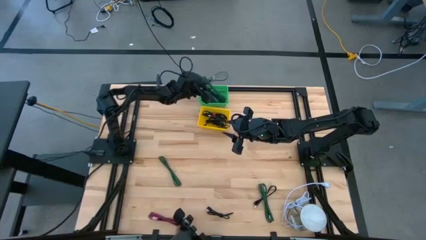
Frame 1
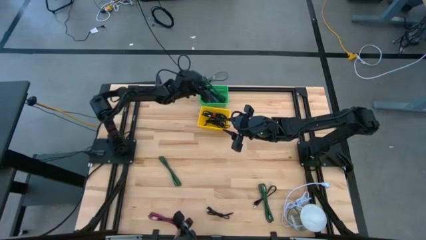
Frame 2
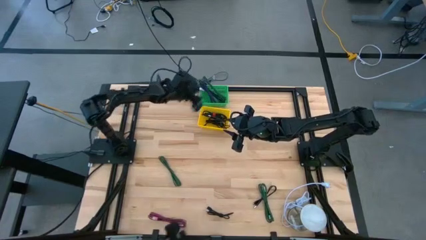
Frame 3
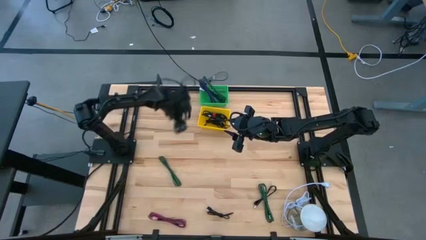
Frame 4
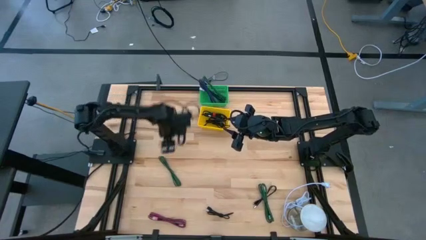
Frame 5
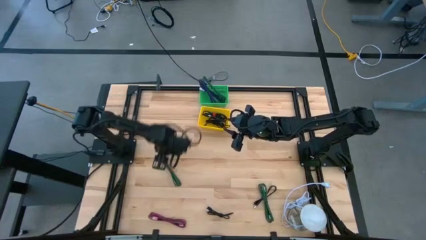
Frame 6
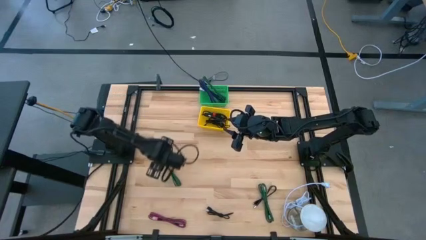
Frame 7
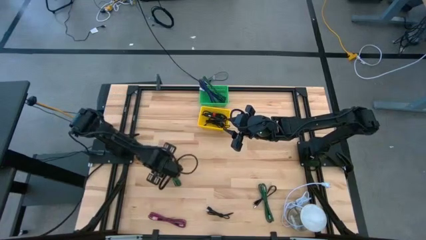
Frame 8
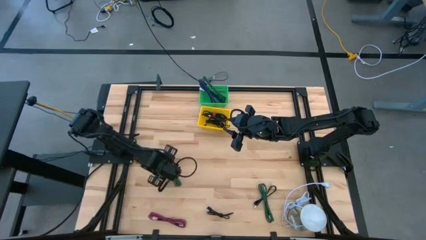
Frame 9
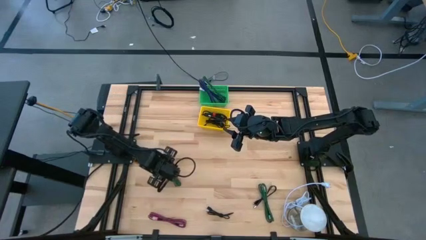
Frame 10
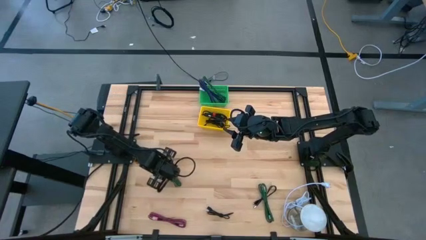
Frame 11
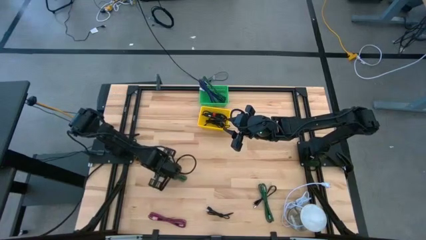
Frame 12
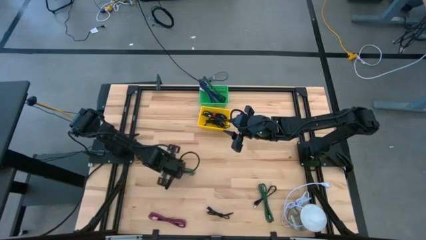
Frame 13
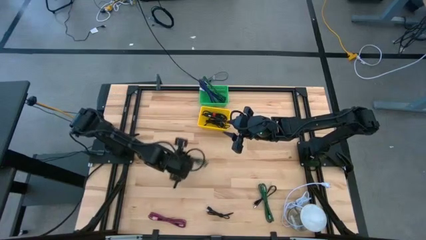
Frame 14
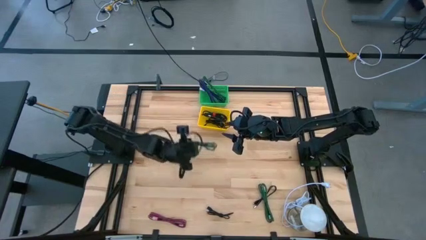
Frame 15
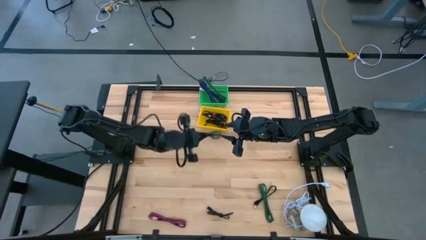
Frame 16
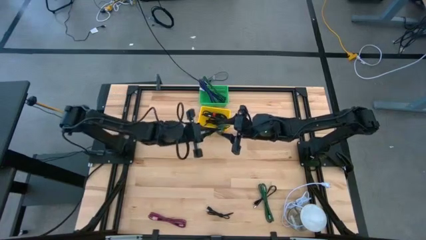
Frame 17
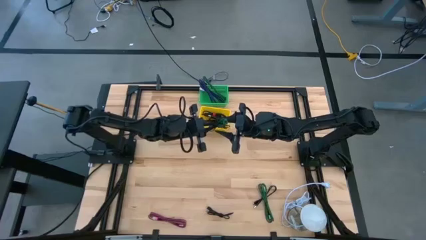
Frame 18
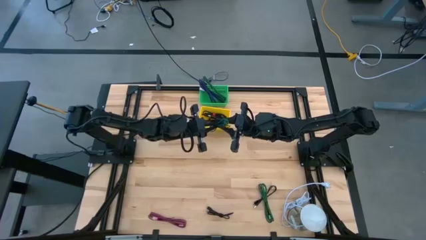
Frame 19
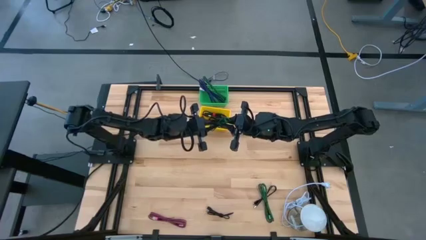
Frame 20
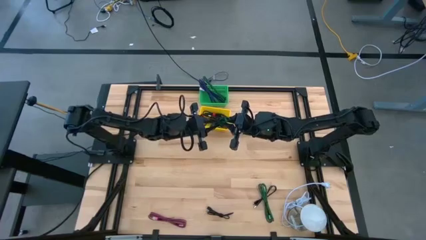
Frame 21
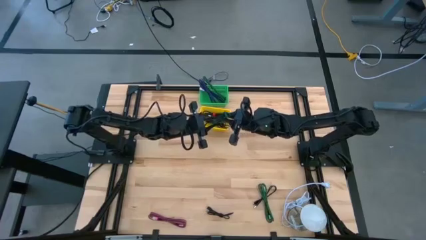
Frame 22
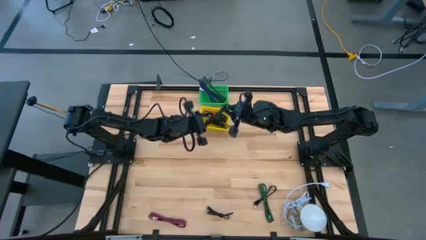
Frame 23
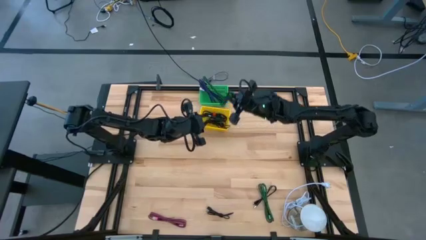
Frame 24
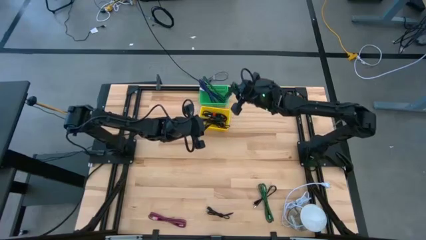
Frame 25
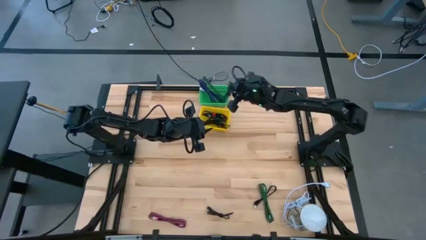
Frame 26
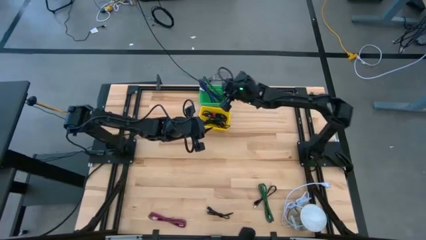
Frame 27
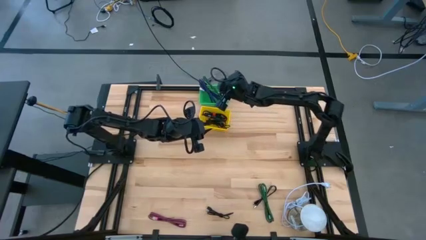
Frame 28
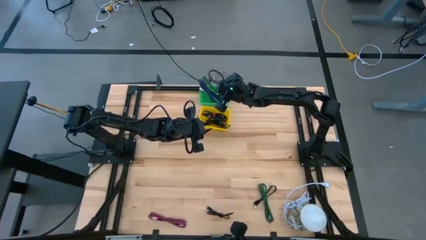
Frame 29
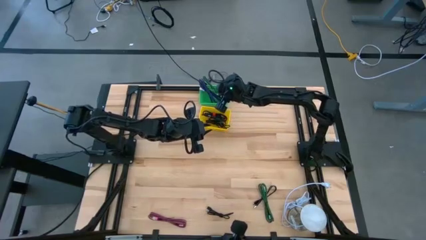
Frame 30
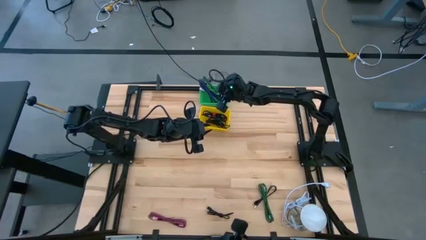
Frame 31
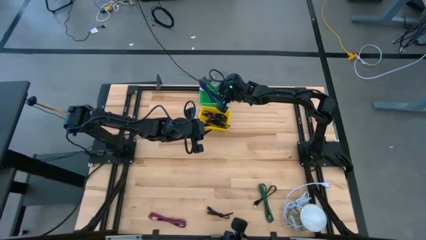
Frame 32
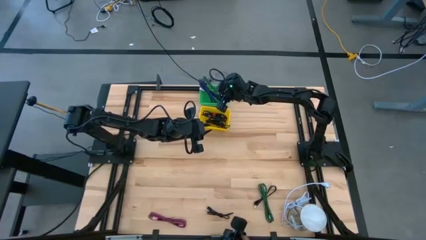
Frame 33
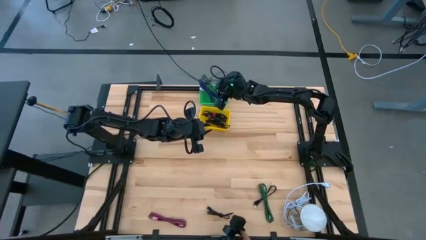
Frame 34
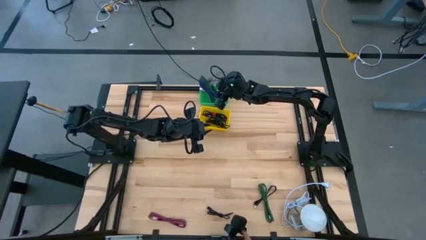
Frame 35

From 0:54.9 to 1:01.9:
Task: Pick & Place USB Port
Put the green charger cable into the green basket

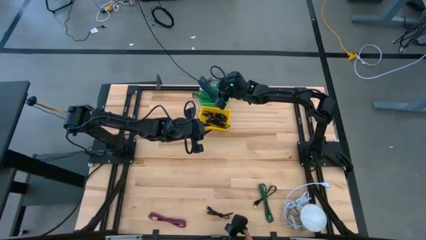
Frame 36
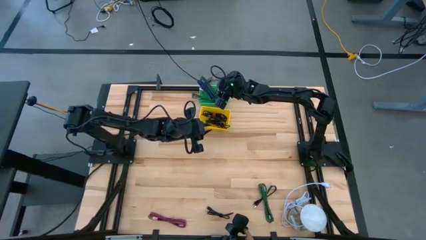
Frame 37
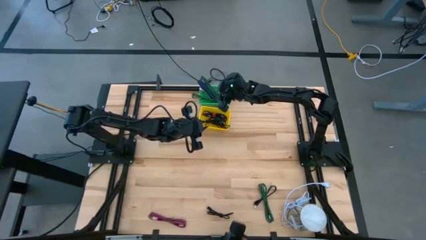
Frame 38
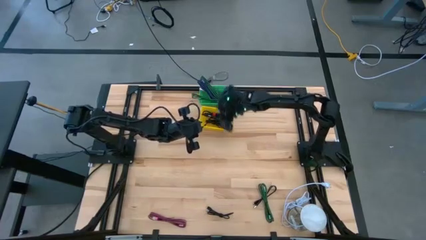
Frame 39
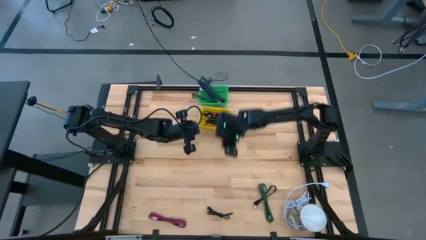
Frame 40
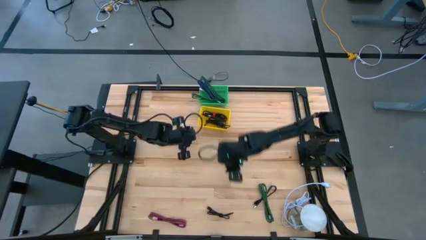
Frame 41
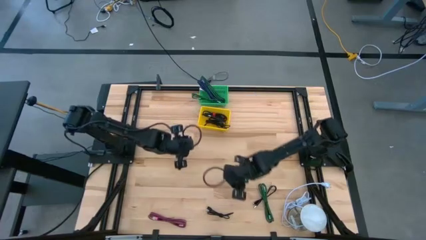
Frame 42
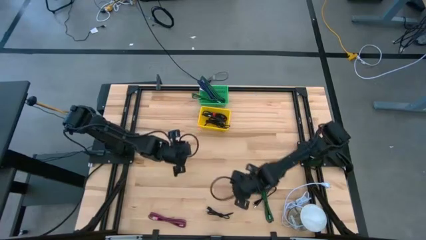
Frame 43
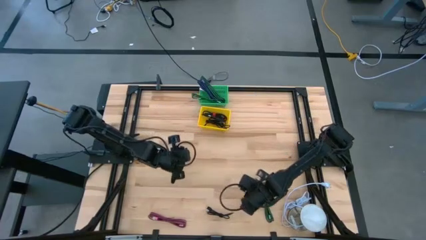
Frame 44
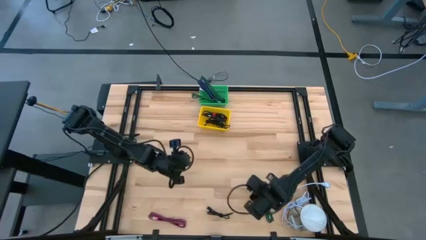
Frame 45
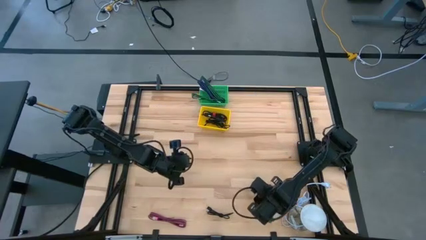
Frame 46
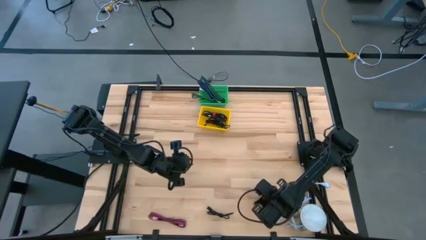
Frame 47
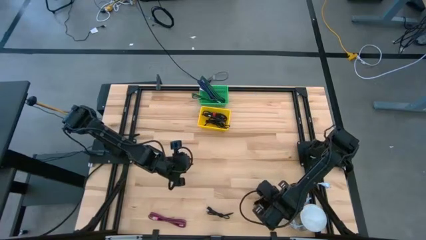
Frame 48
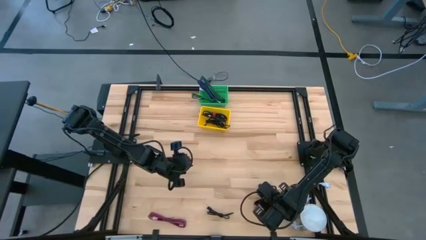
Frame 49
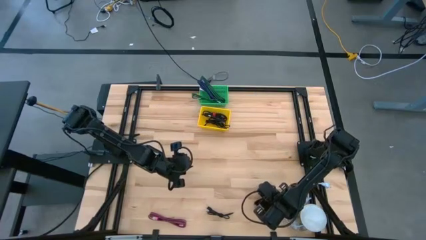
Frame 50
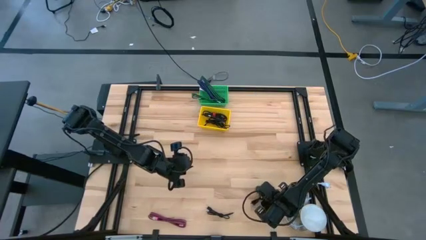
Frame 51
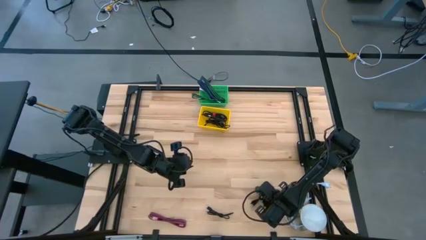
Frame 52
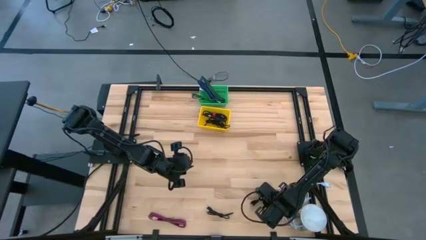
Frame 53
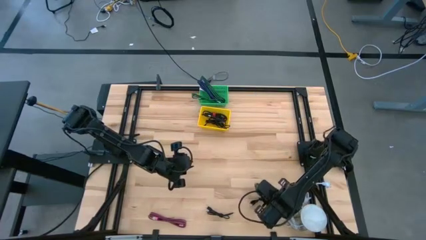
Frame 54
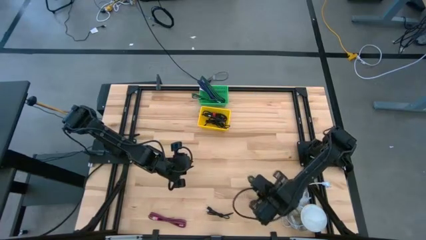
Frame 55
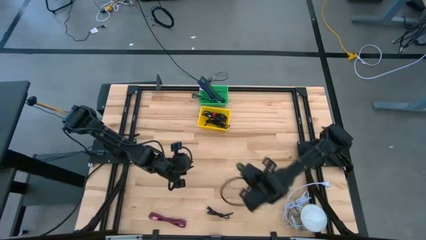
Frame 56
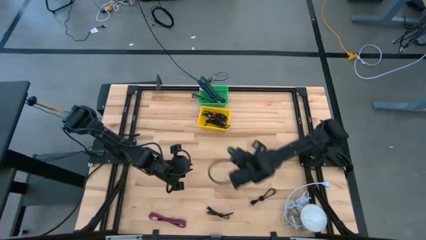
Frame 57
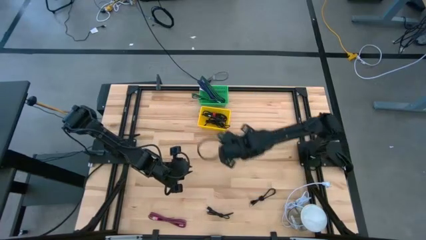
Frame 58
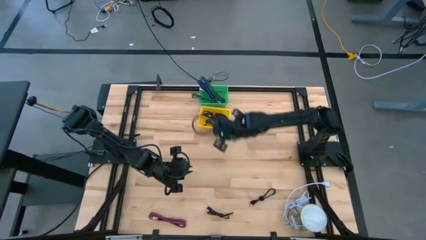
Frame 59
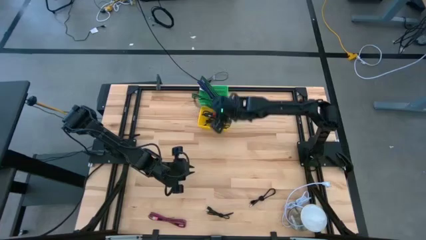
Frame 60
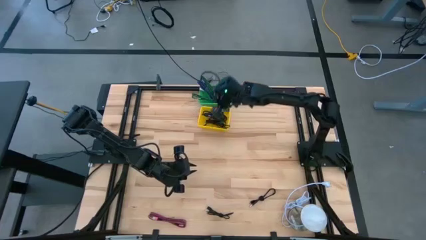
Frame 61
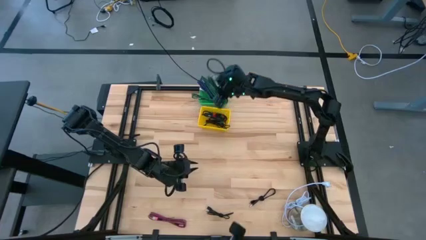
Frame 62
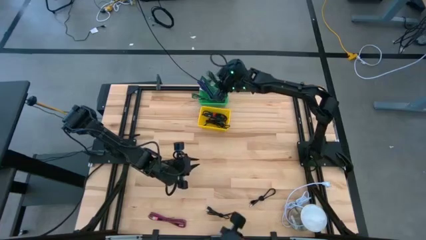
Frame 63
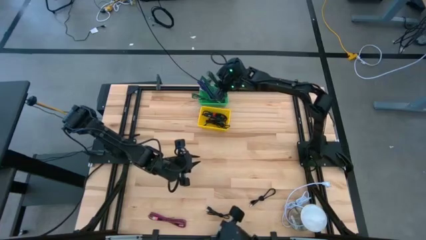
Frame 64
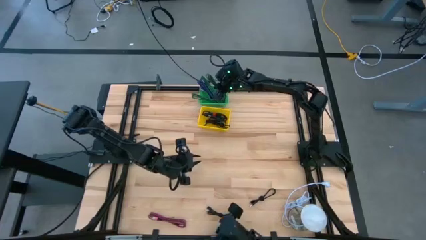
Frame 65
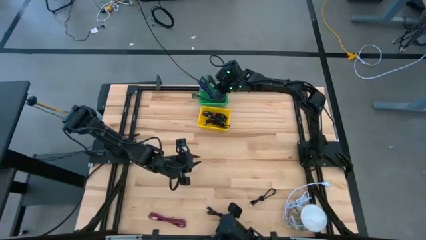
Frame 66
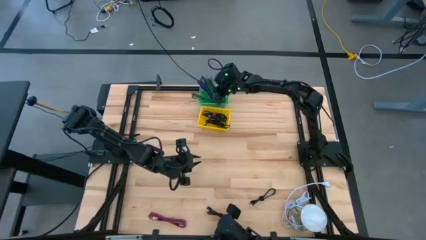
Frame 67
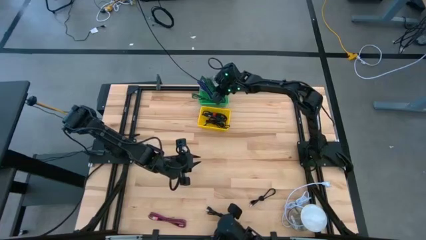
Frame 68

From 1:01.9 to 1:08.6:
Put the green charger cable into the green basket

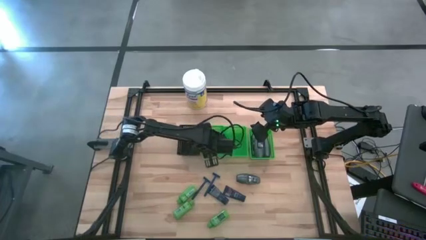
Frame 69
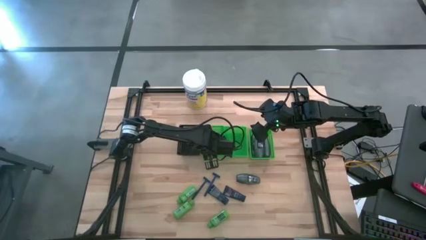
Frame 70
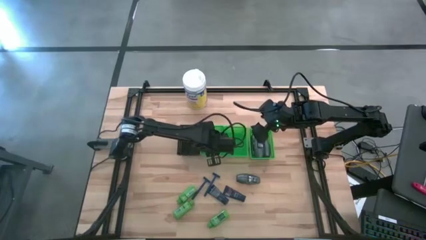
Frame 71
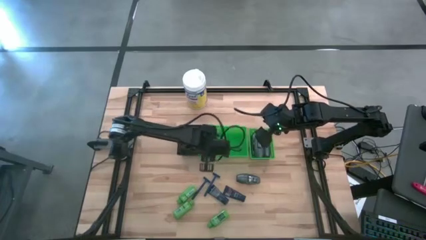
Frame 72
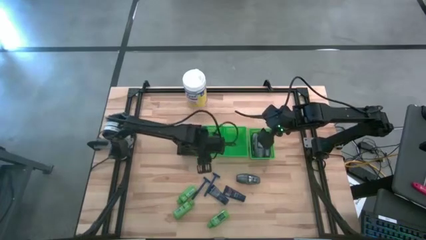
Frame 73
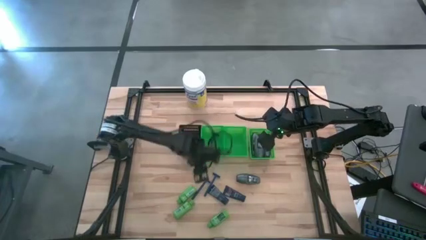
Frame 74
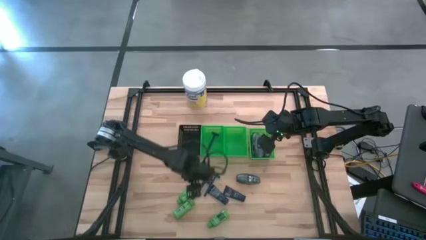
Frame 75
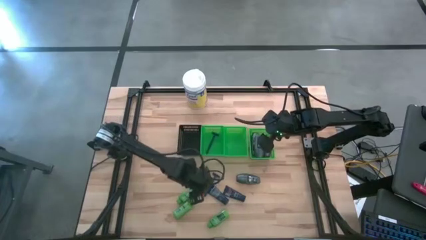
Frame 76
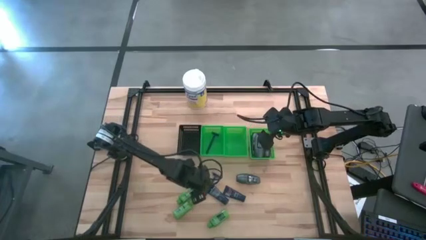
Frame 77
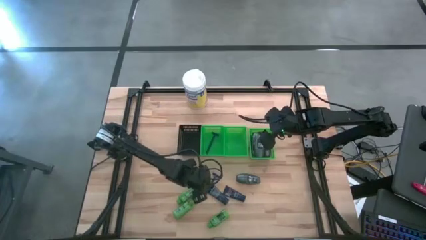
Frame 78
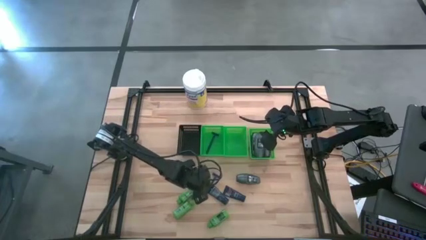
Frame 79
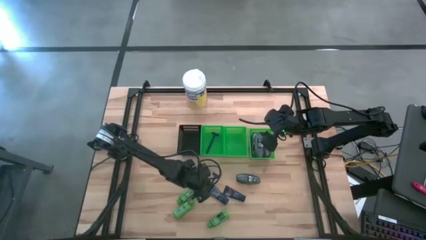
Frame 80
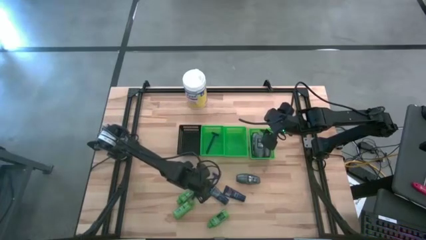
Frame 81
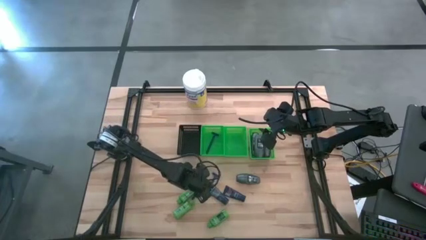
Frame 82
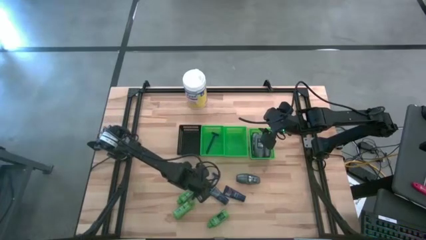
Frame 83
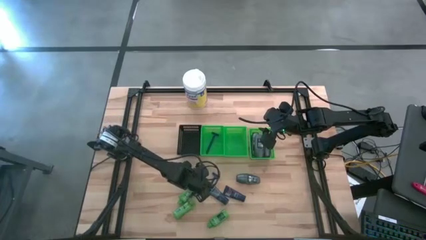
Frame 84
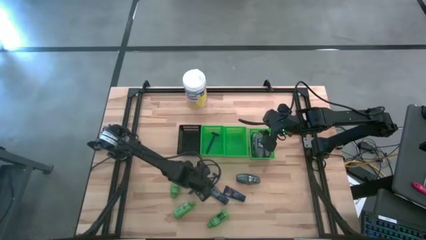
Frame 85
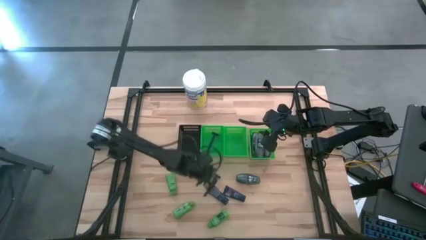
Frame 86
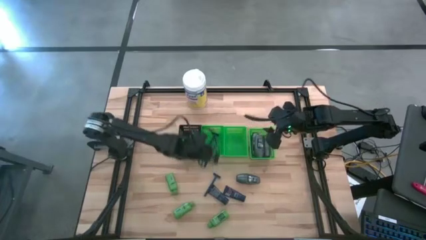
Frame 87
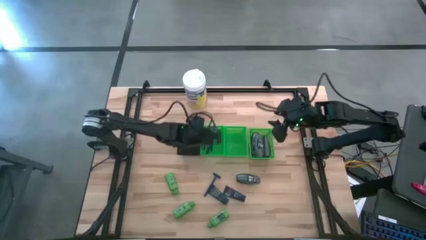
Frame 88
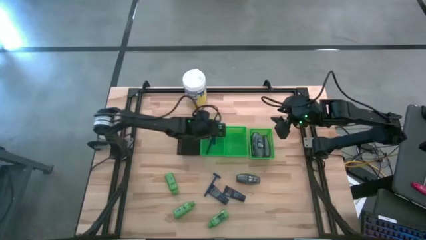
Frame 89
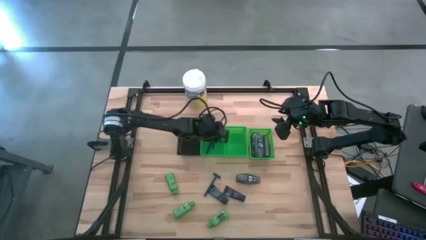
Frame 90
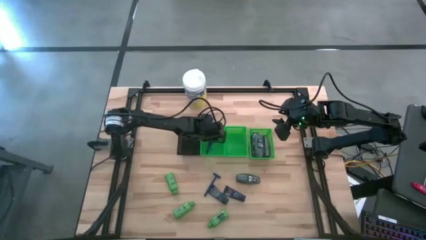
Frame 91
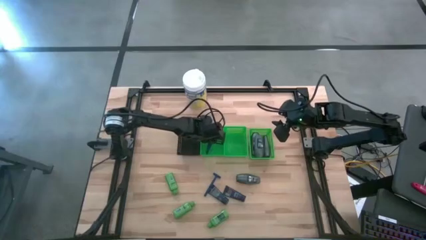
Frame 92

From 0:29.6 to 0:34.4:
Task: Pick & Place Travel size toiletries
Put the razor into the left green bin
